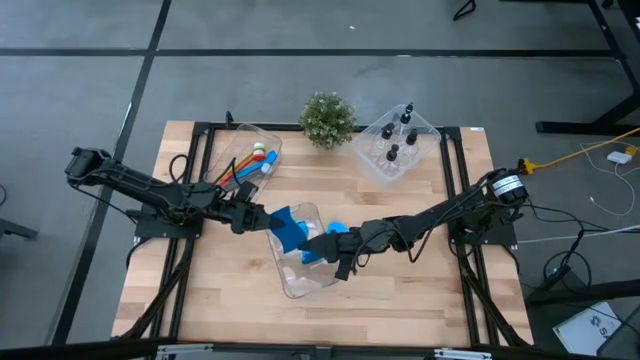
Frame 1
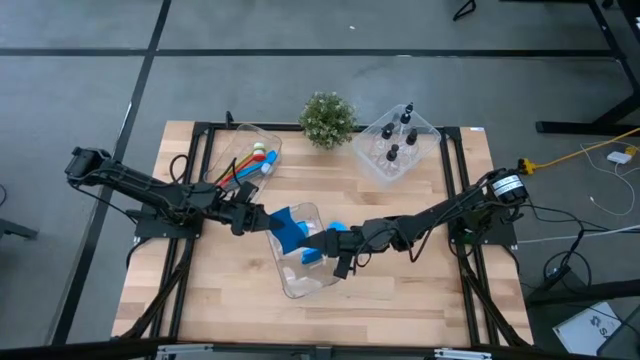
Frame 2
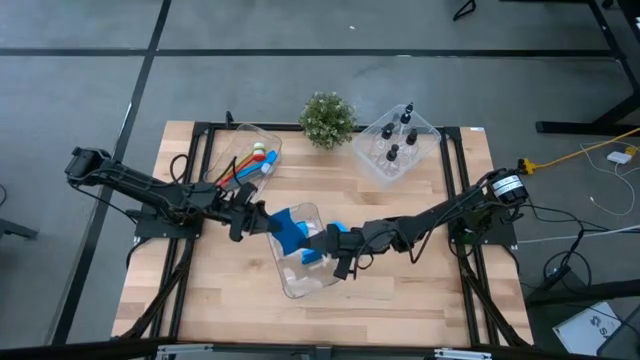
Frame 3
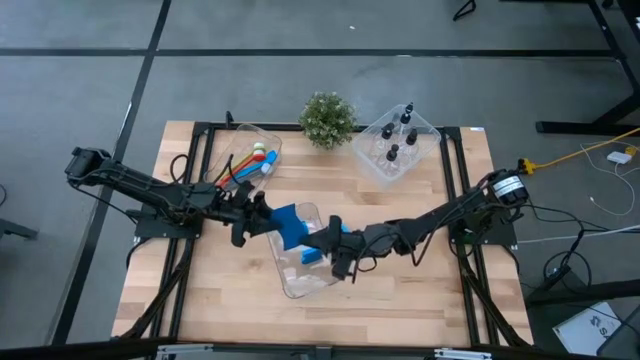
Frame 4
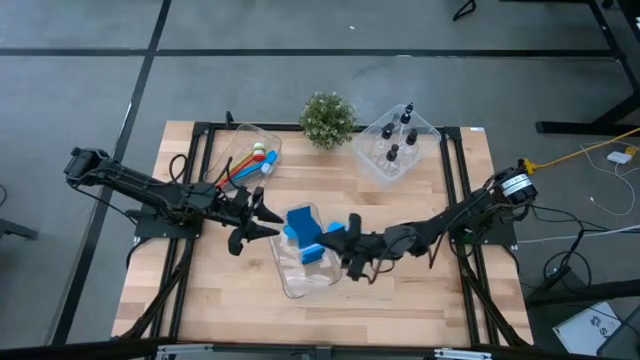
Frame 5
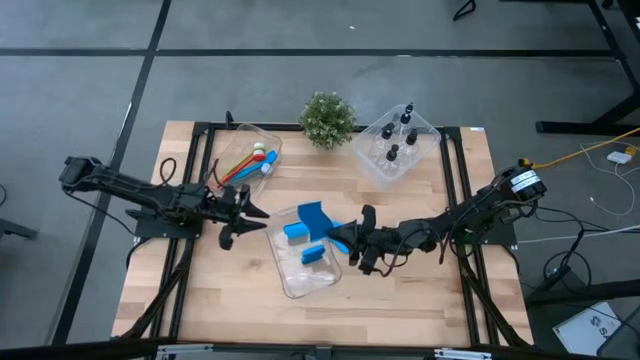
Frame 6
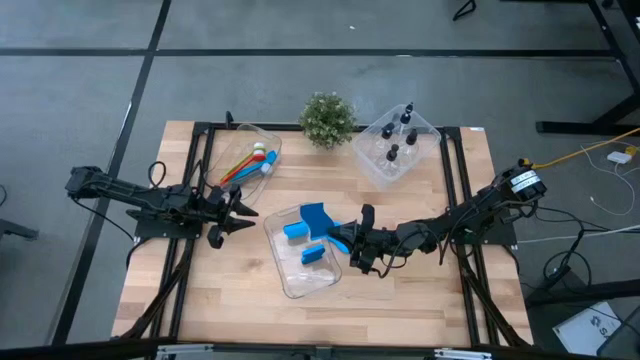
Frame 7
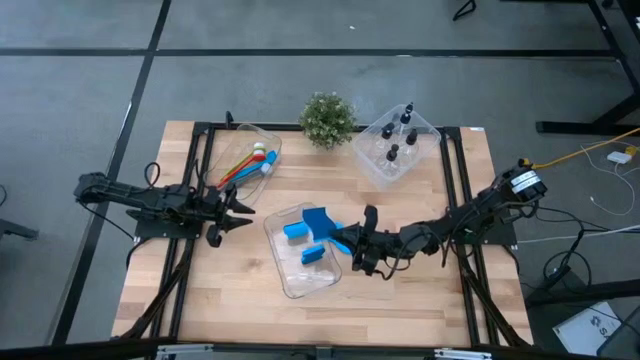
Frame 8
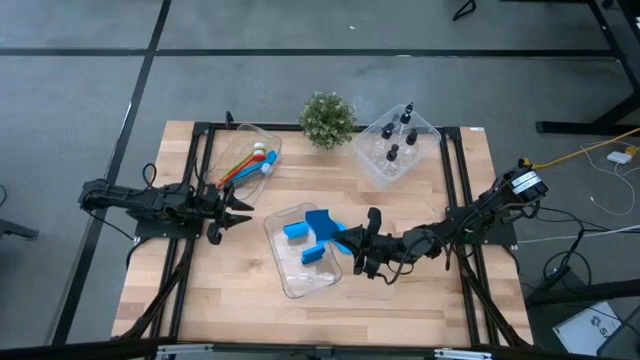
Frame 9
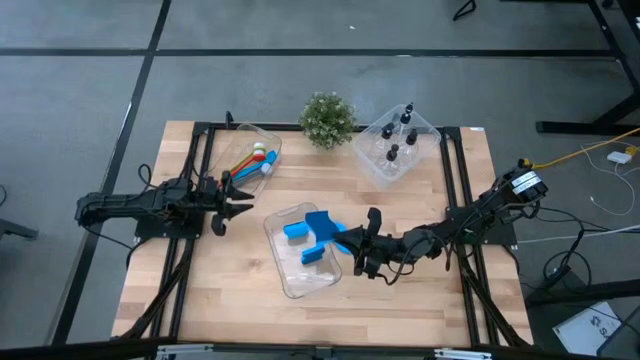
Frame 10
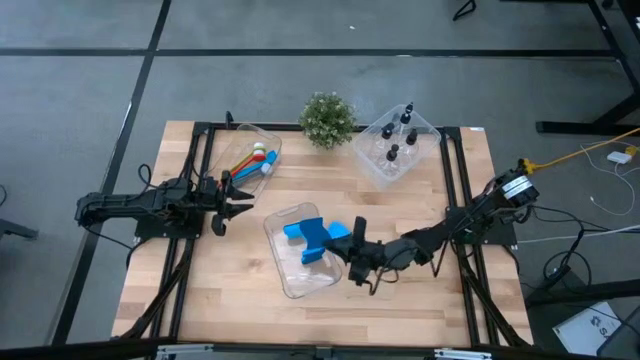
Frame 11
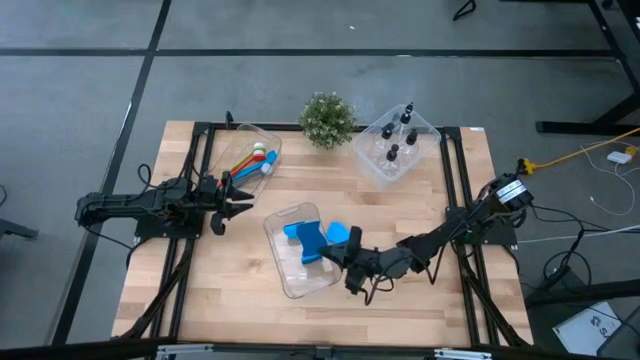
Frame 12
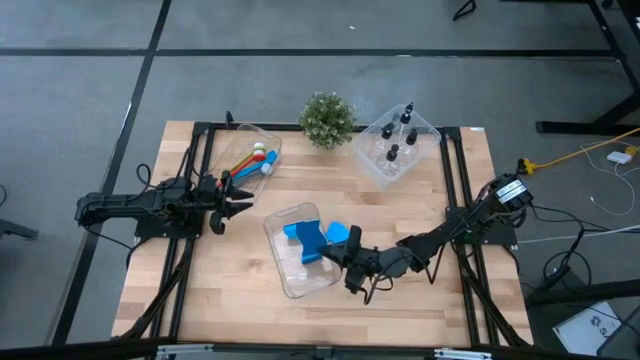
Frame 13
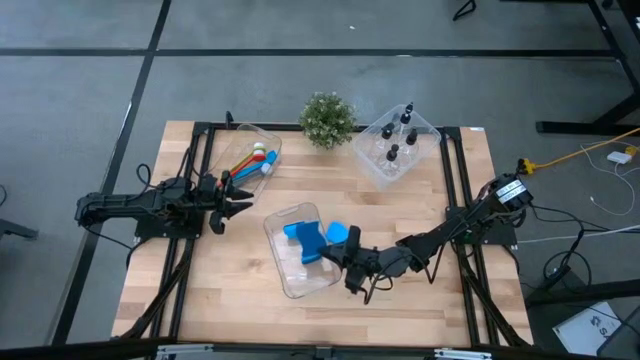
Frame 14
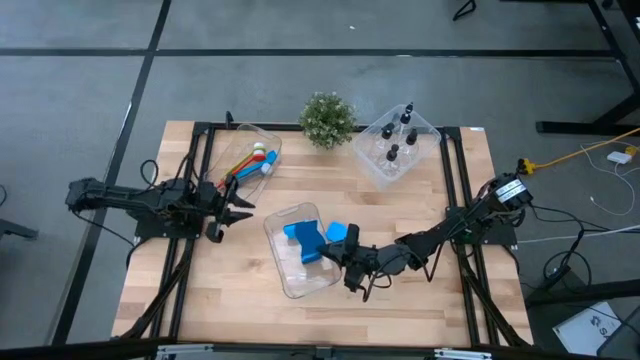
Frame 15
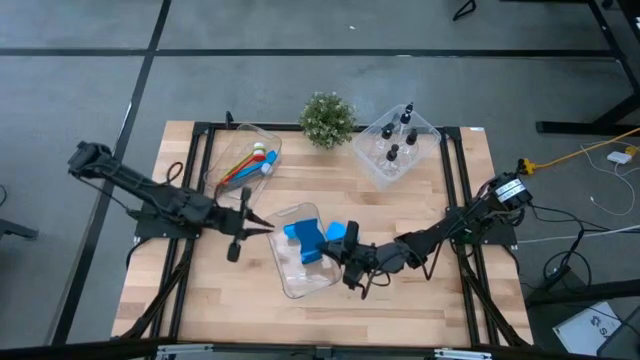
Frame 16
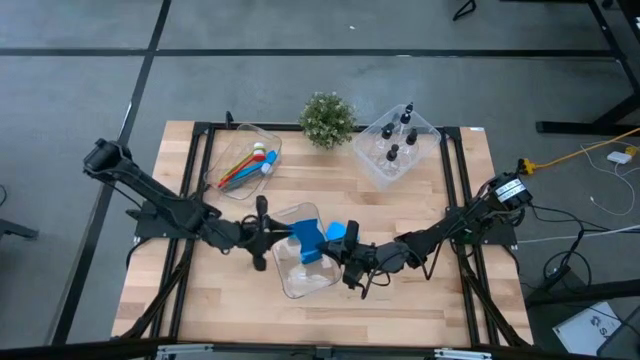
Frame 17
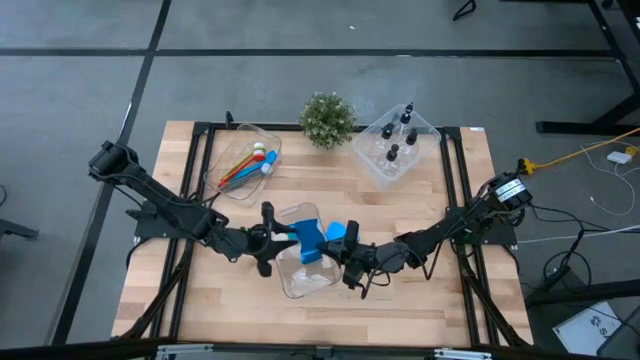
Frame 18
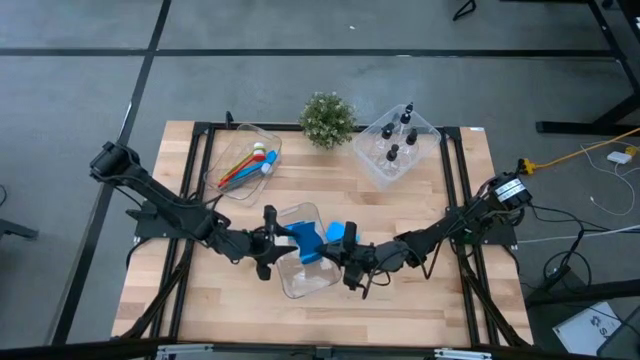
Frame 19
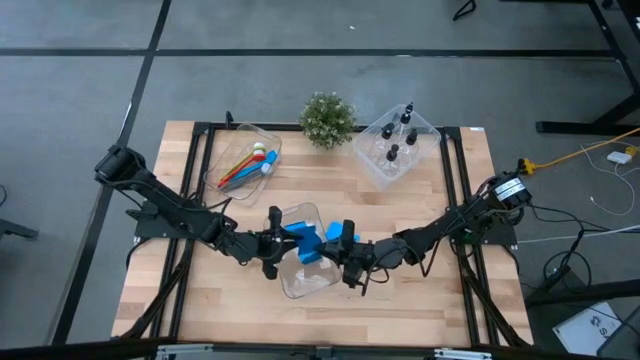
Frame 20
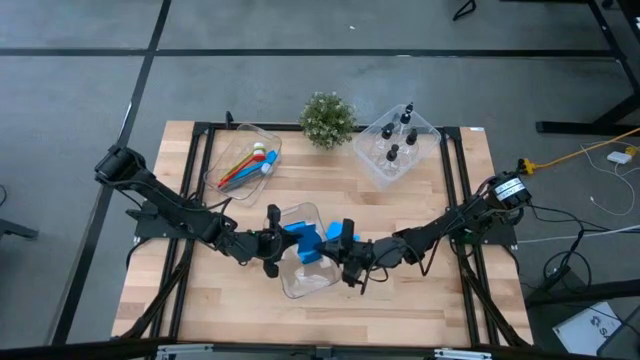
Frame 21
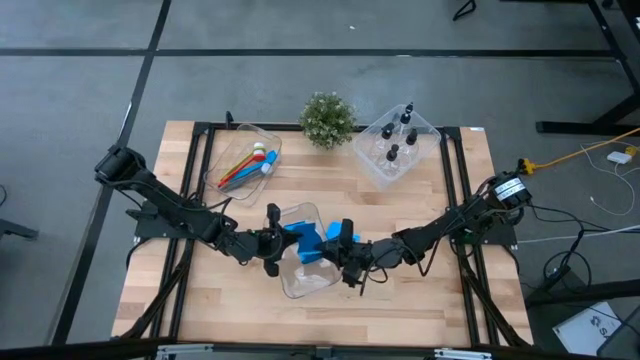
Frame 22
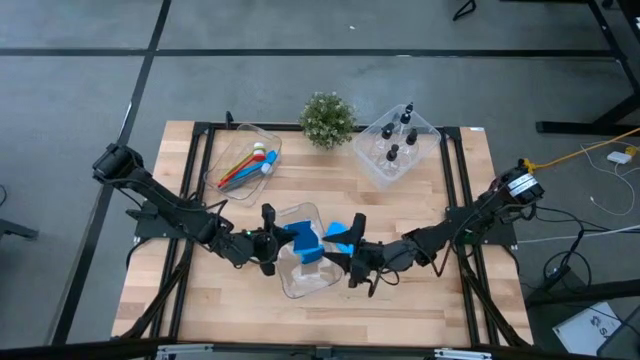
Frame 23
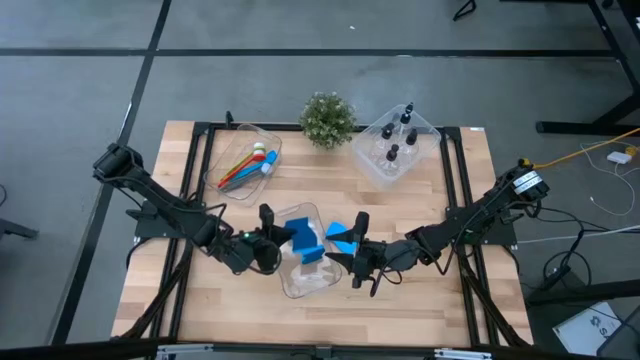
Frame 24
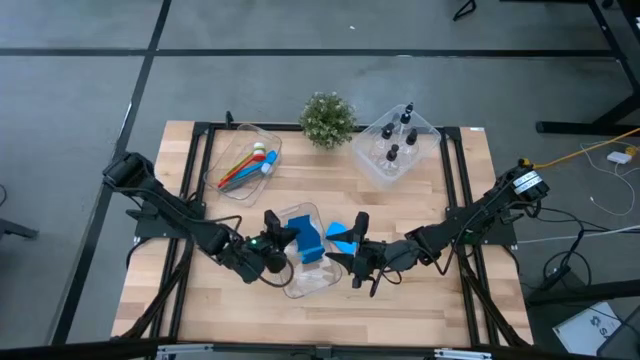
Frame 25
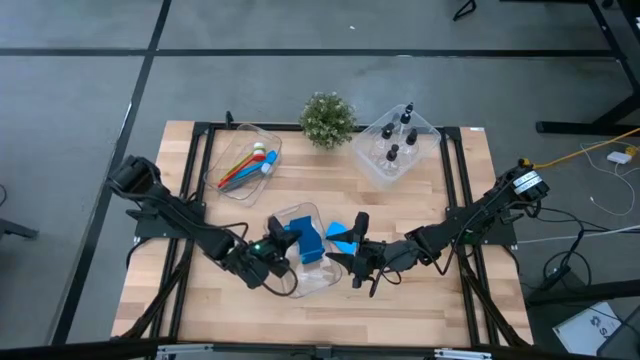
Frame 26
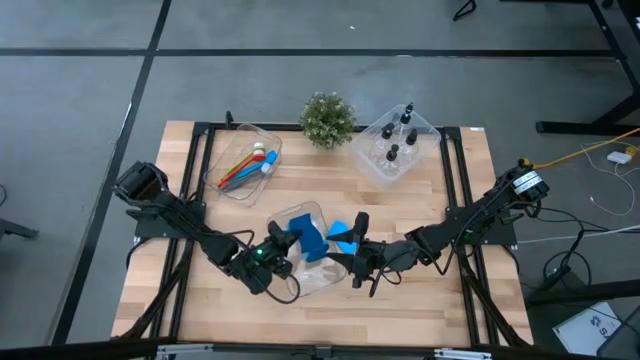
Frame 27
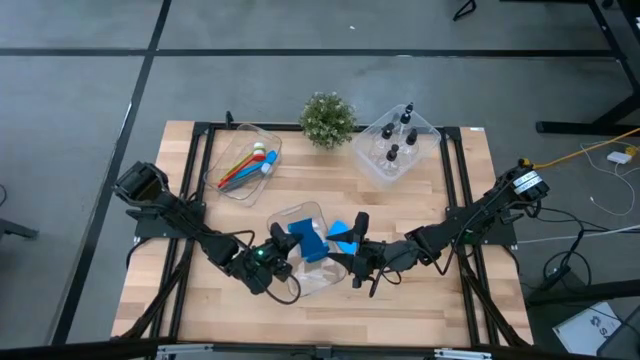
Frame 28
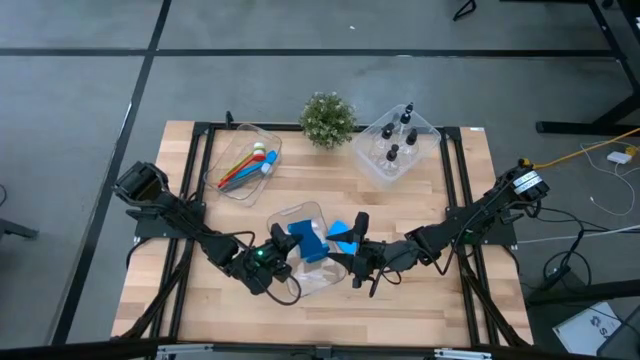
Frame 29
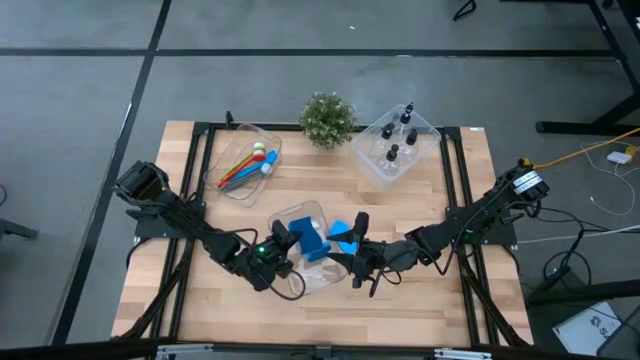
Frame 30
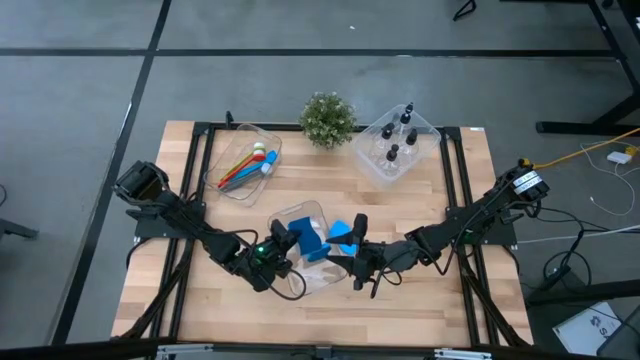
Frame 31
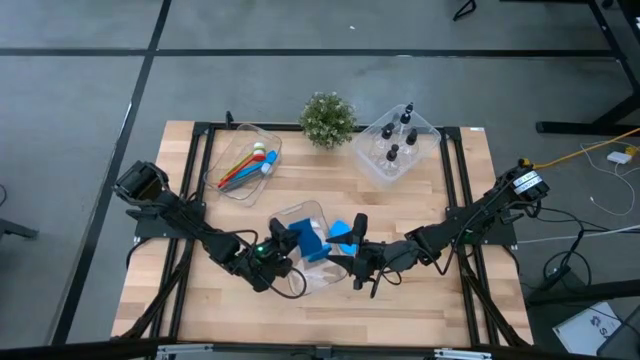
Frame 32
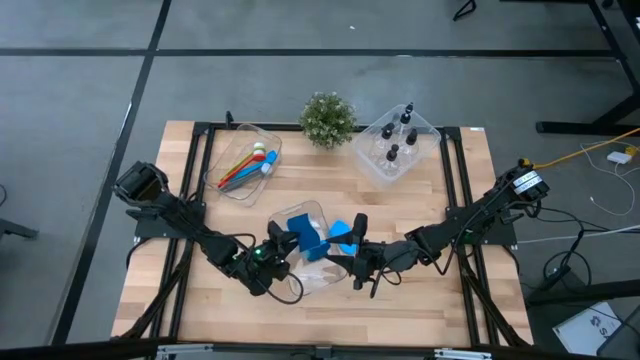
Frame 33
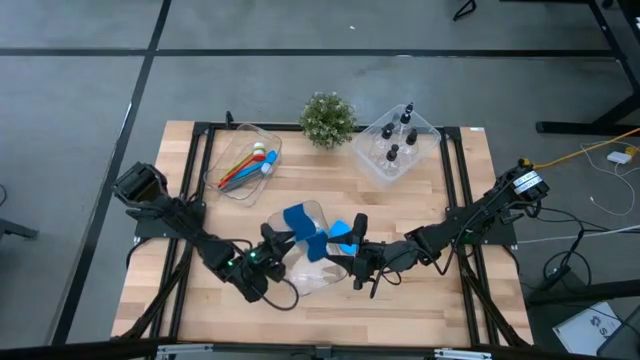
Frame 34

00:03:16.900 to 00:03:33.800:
Task: Pick & Place Kitchen Sink Supplies
Put the sponge into the bottom transparent bin

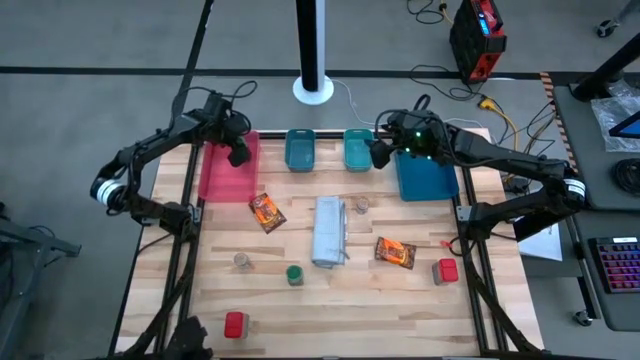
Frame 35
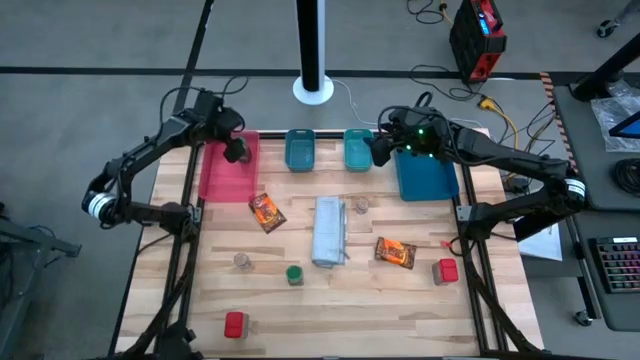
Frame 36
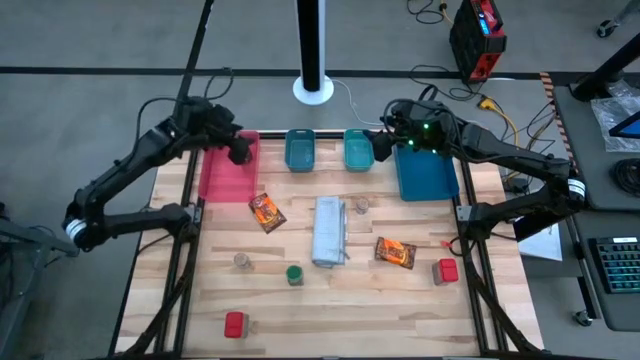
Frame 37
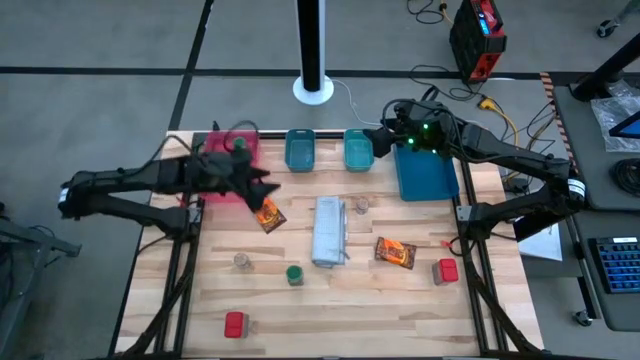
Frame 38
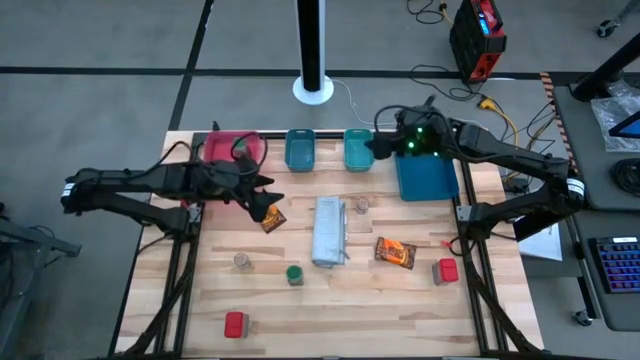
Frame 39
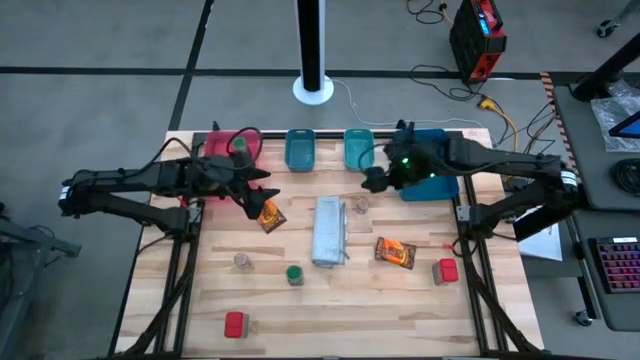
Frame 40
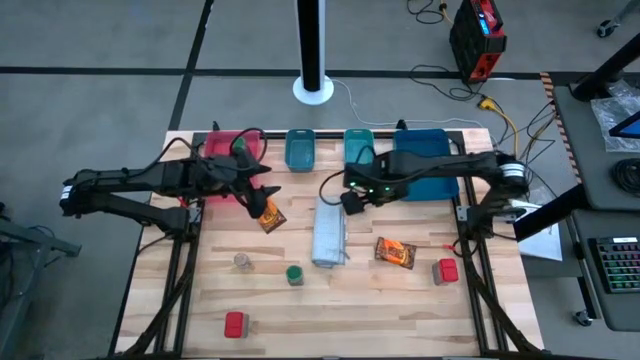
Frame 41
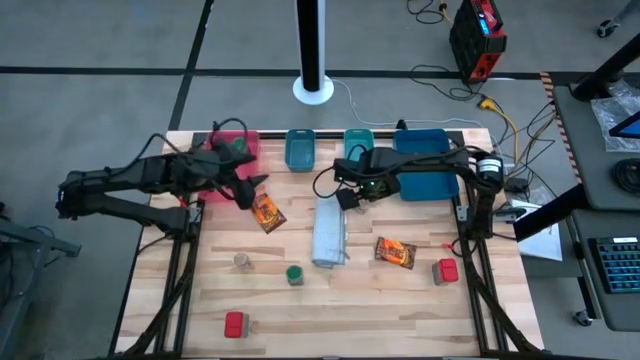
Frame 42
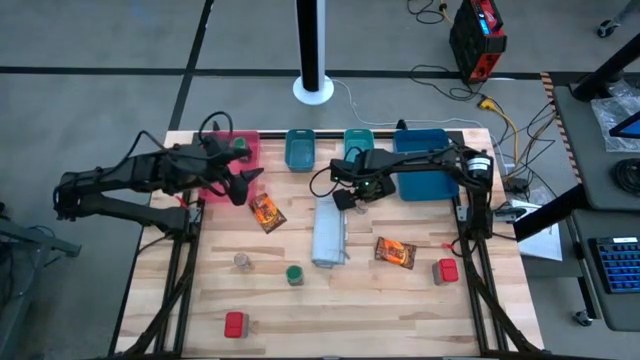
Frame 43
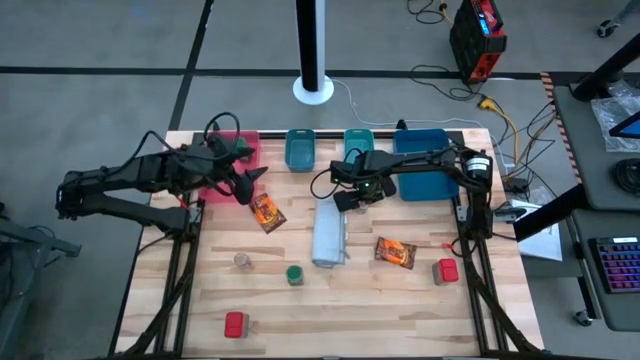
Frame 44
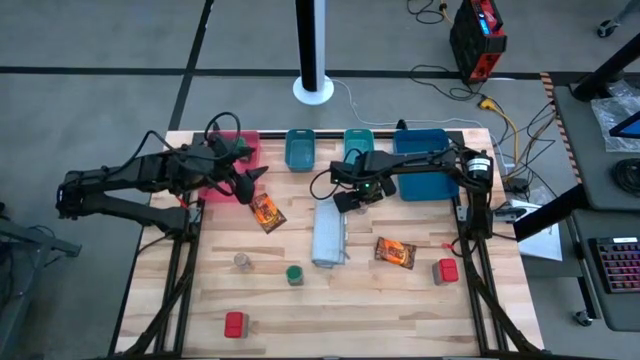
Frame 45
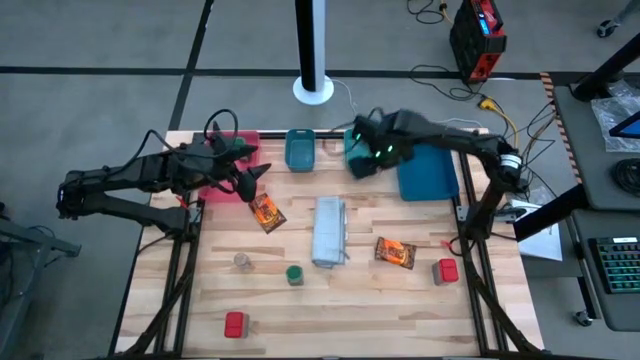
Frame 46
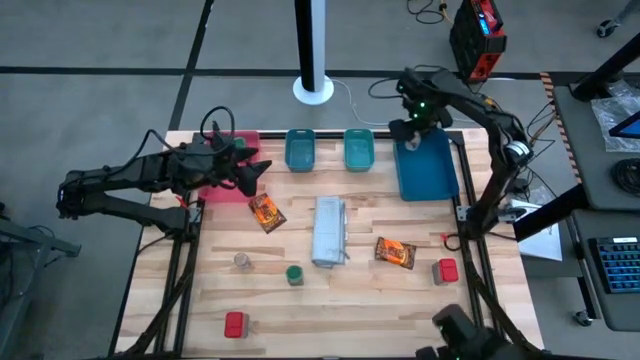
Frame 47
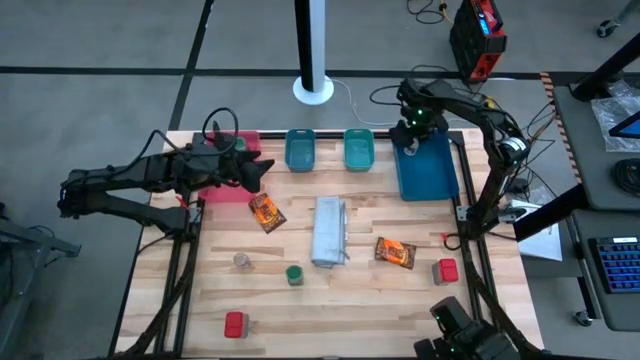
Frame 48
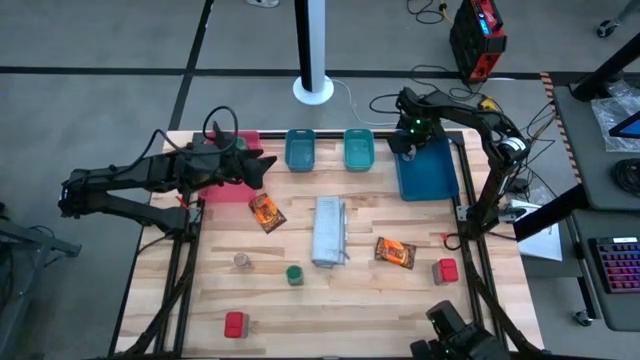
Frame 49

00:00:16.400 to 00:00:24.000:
Task: Sort spices by type
Put the top brown seasoning bottle into the blue bin
